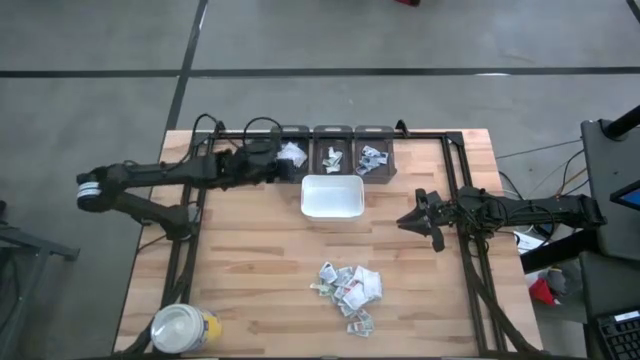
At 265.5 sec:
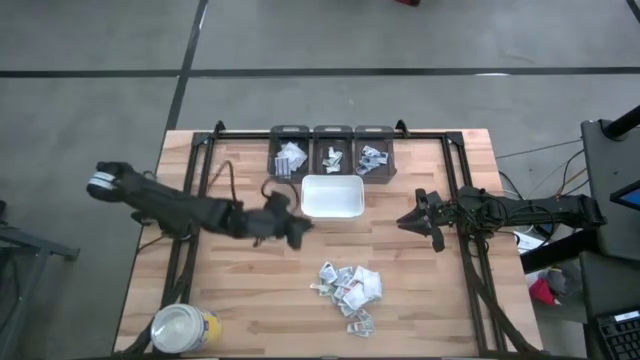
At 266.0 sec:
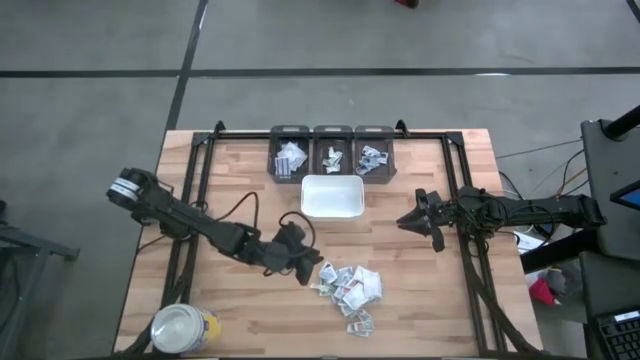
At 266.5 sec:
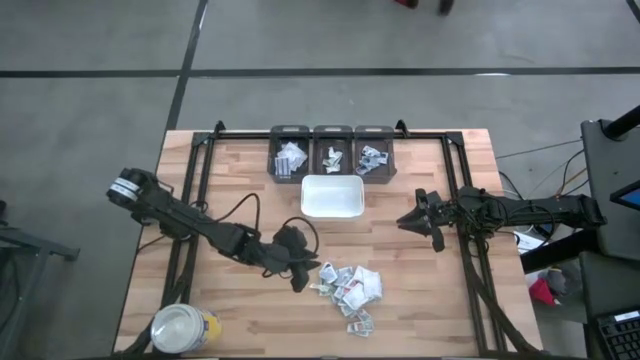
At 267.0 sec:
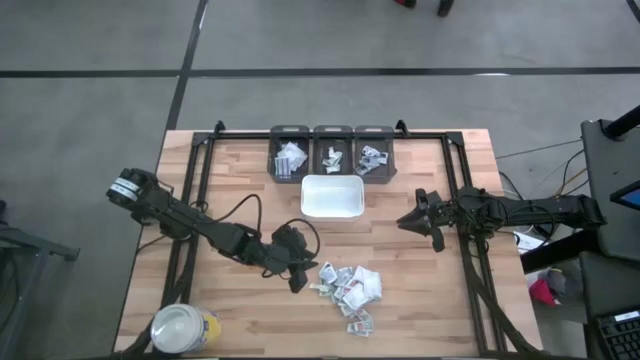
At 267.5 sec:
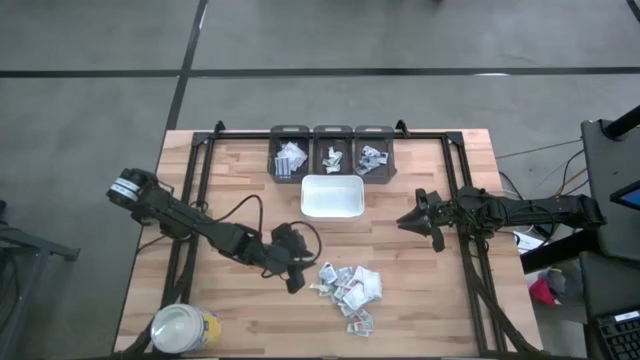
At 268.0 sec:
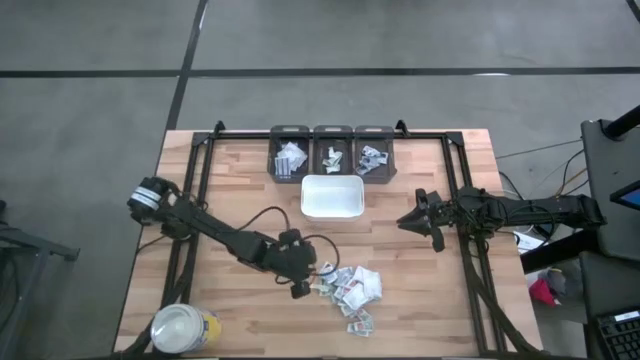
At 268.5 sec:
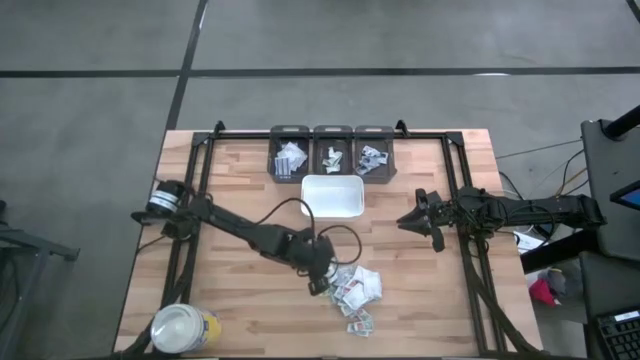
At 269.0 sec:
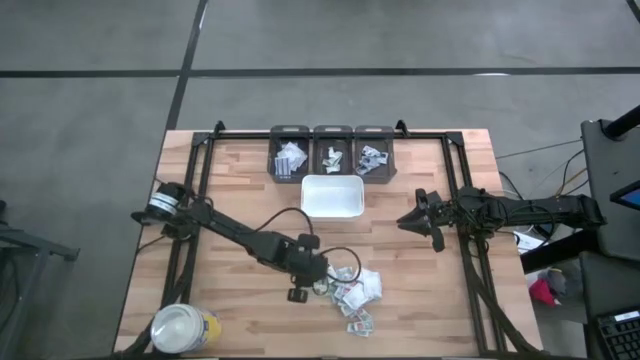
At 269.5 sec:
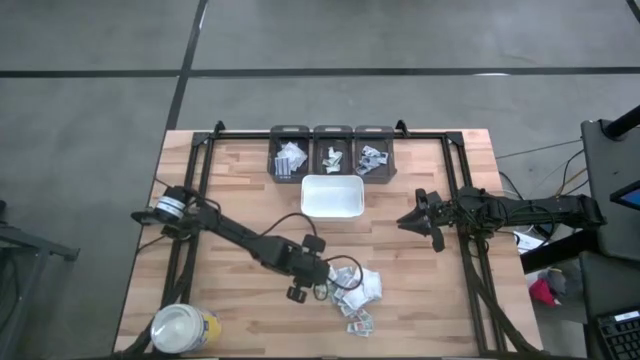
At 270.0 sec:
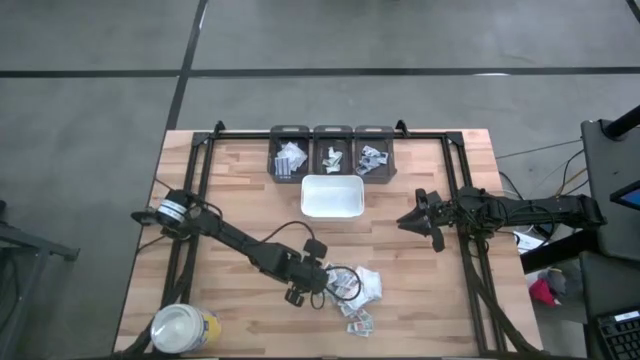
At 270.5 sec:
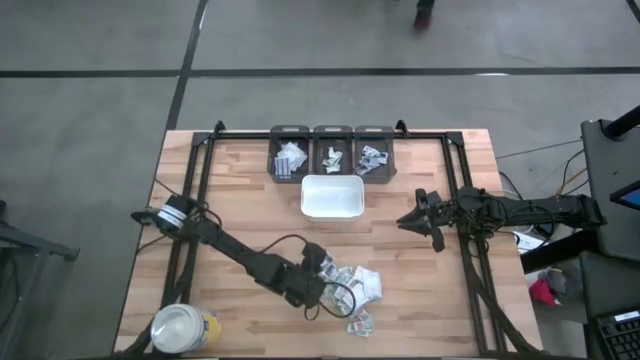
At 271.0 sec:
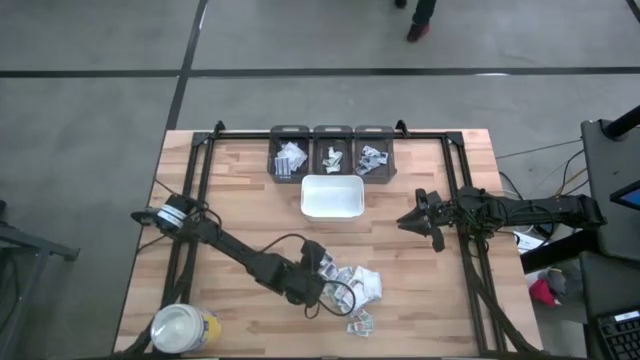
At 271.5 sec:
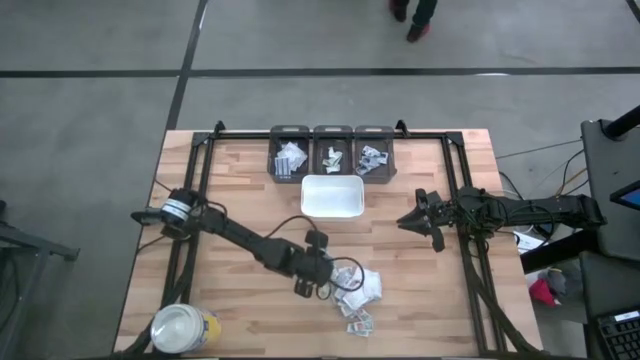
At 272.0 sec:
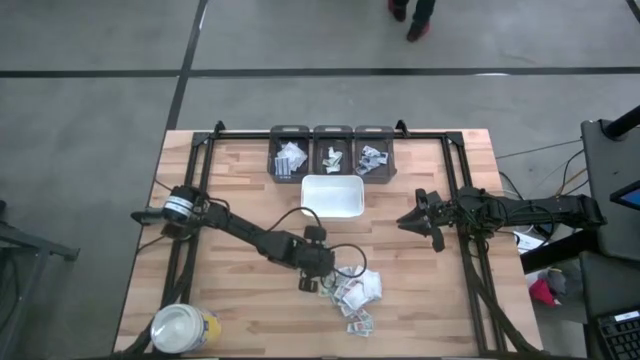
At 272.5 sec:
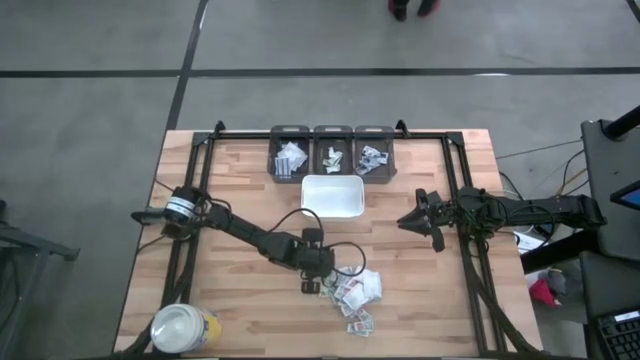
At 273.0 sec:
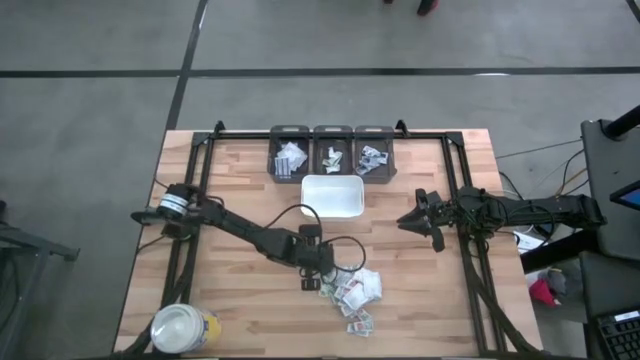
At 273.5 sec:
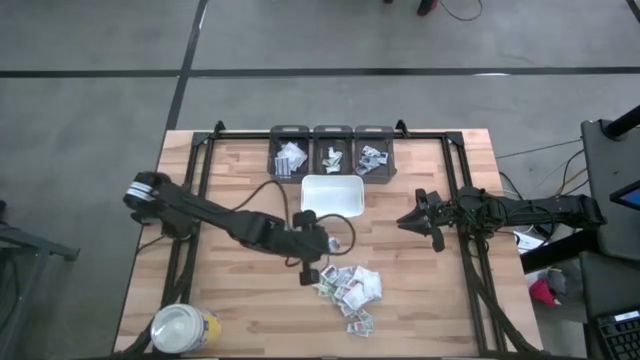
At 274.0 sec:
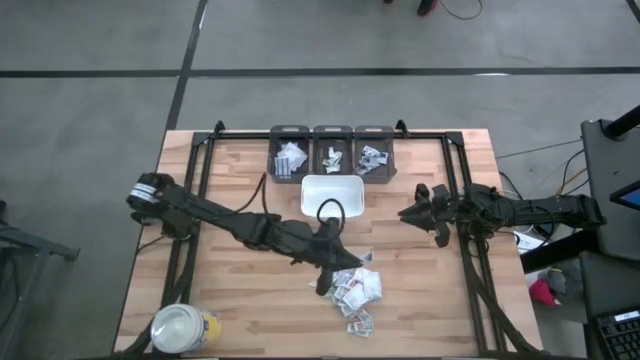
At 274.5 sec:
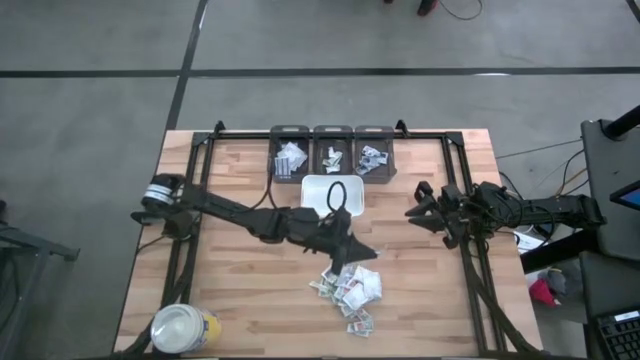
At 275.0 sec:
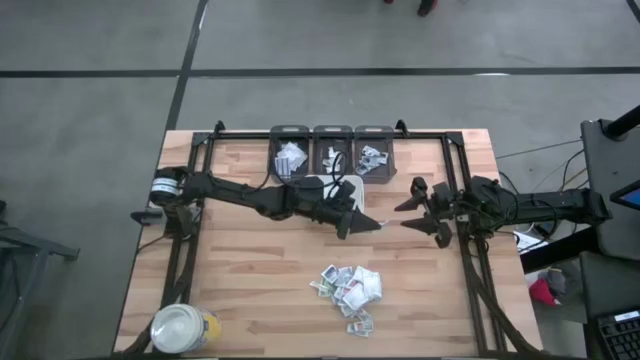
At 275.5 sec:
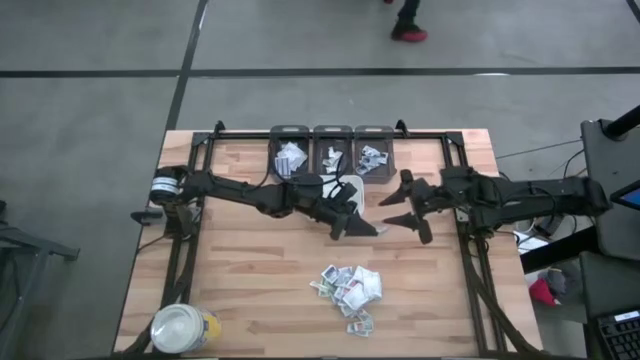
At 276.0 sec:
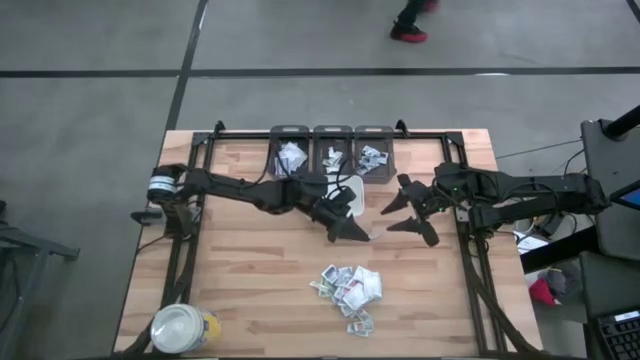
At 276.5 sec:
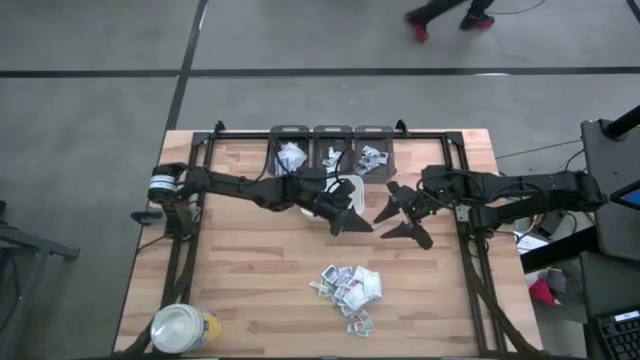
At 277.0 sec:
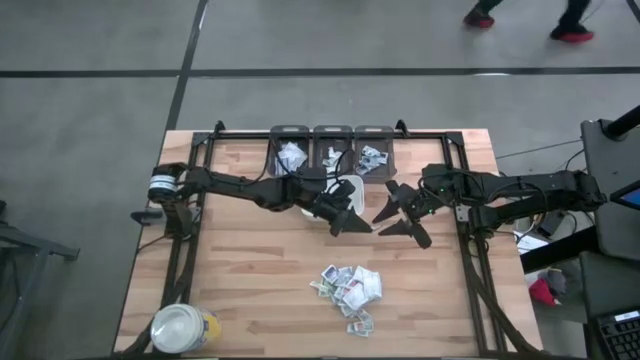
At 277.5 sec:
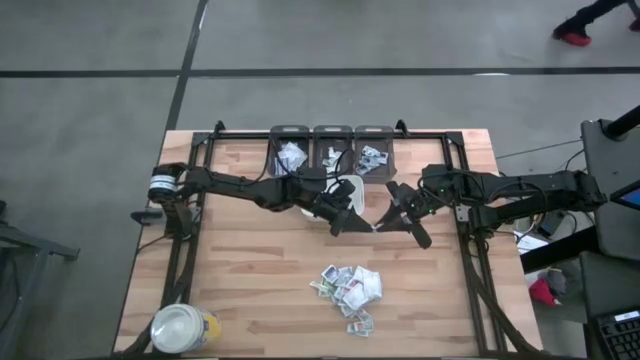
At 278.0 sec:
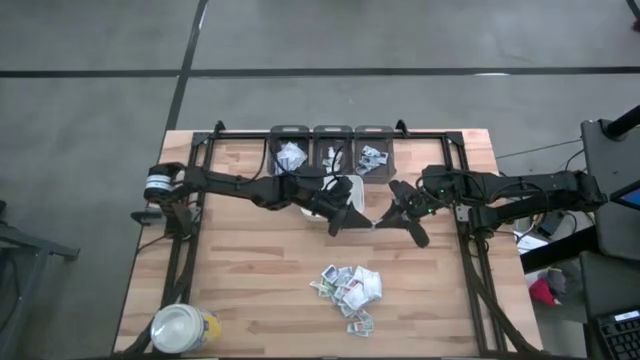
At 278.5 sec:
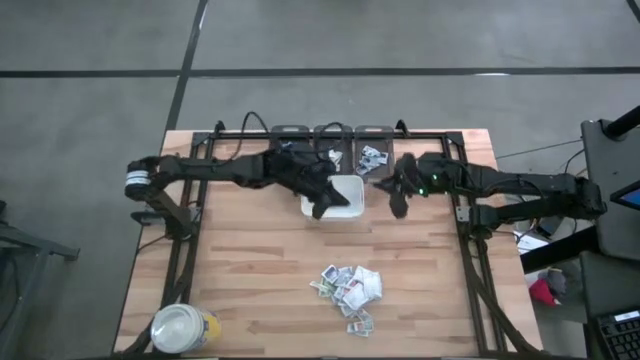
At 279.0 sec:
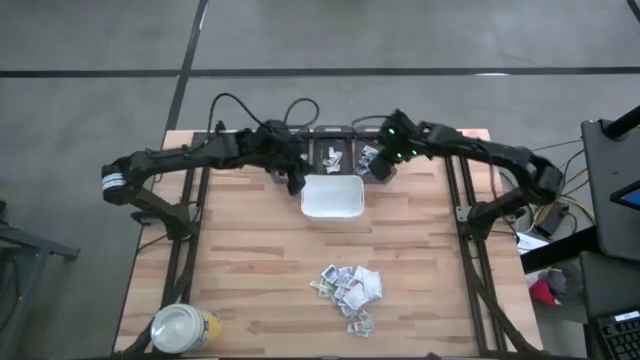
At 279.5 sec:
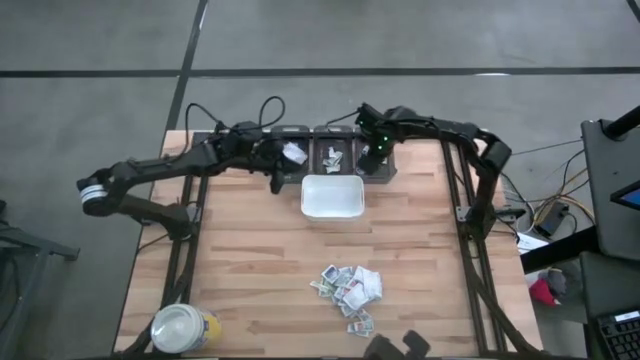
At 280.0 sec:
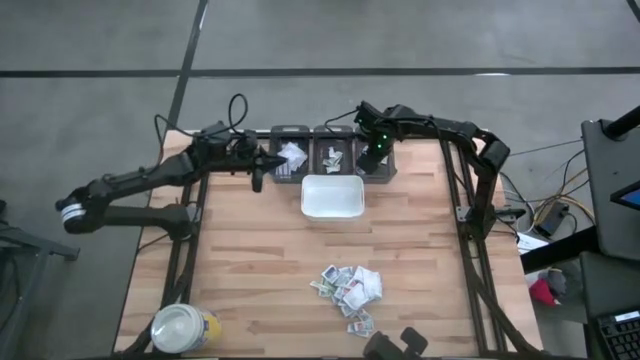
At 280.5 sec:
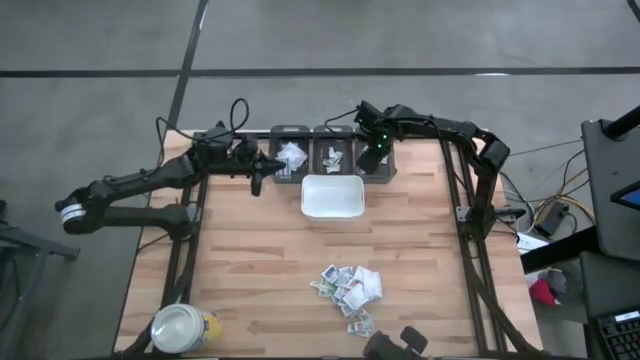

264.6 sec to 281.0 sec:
Task: Pick & Place First Aid Supplies
Put the white alcohol pad into the right black bin

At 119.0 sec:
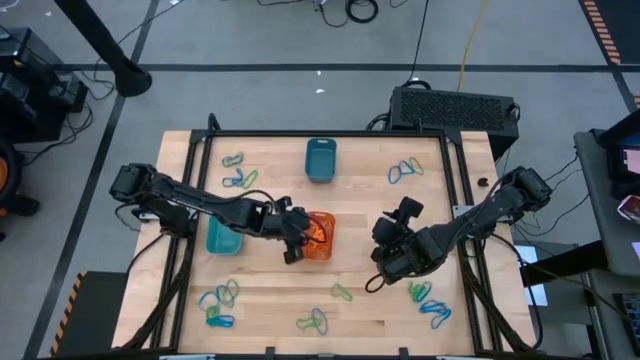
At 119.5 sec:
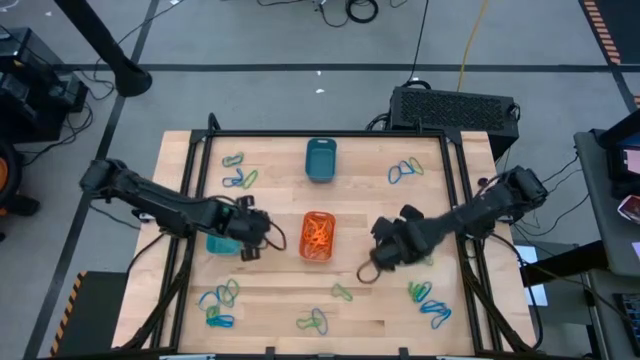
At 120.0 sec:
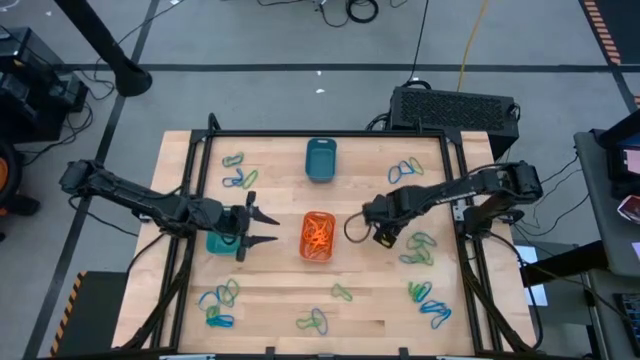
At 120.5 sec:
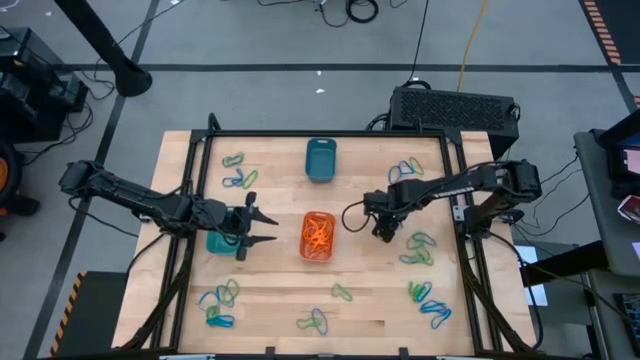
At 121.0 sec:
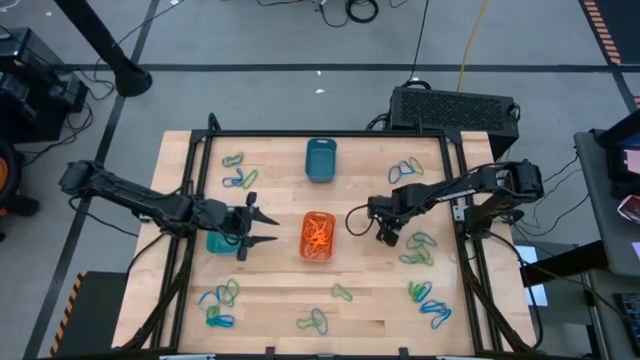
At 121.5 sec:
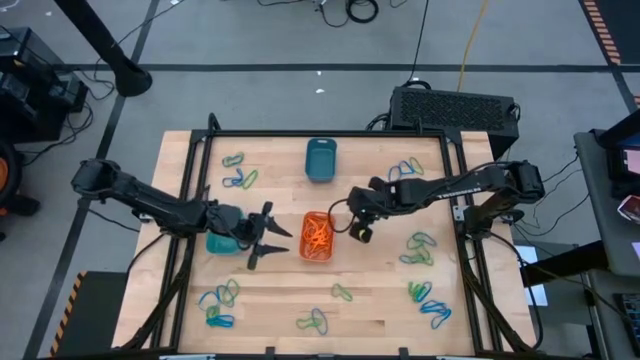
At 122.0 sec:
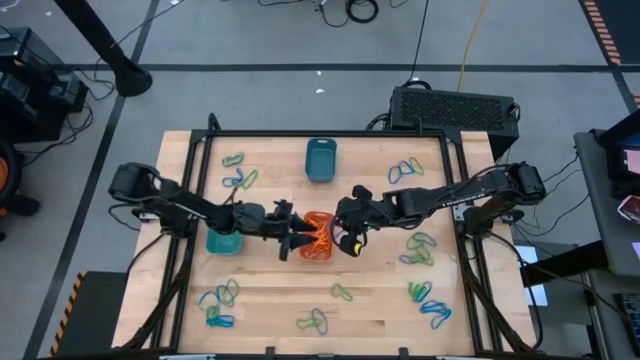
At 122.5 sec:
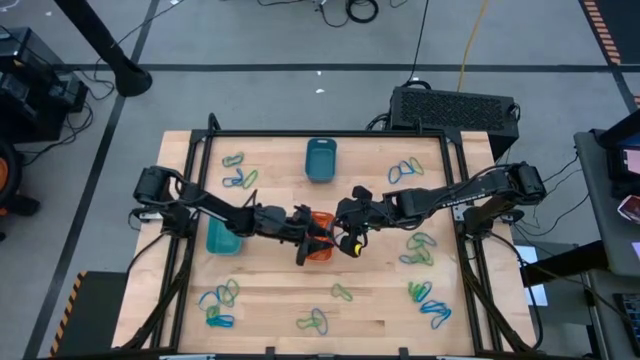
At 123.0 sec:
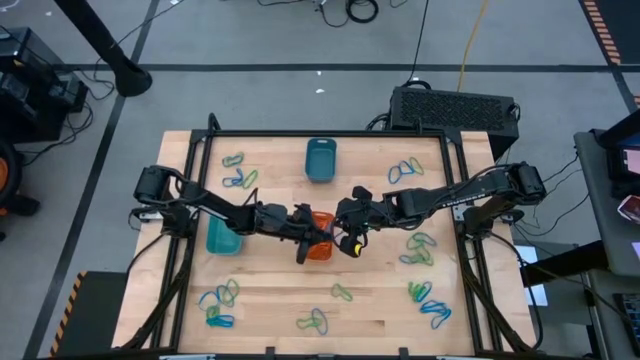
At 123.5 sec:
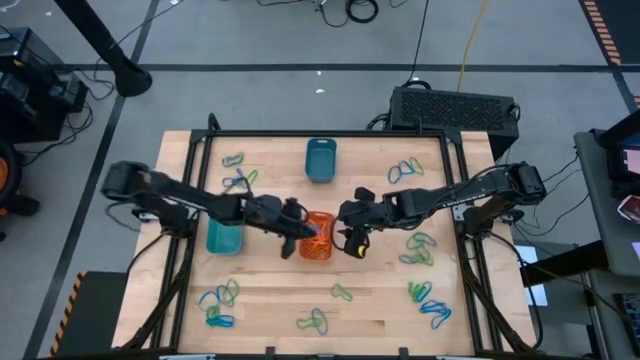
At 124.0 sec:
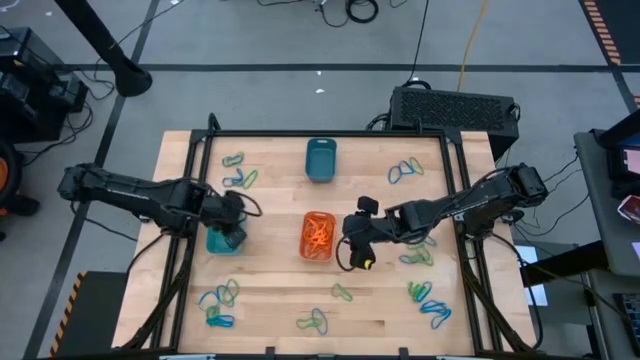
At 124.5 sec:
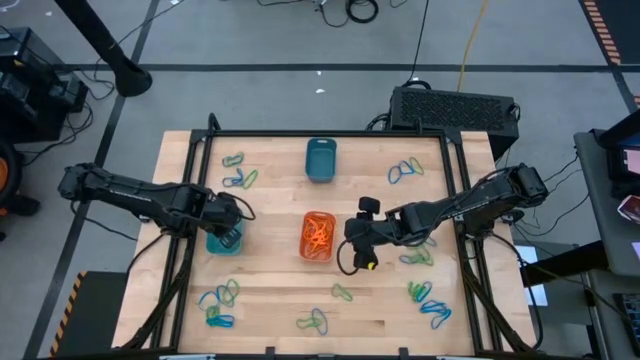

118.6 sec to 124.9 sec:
Task: Sort rubber bands into baskets
Put the blue rubber band into the green bin
